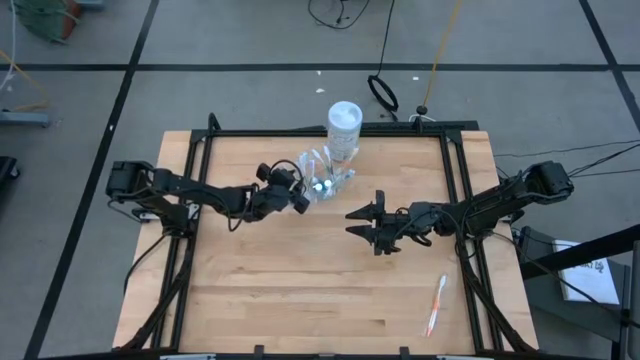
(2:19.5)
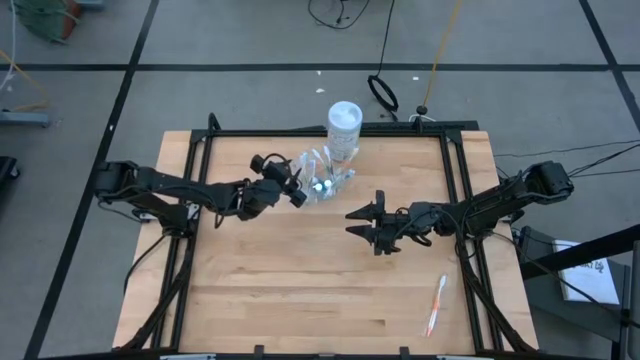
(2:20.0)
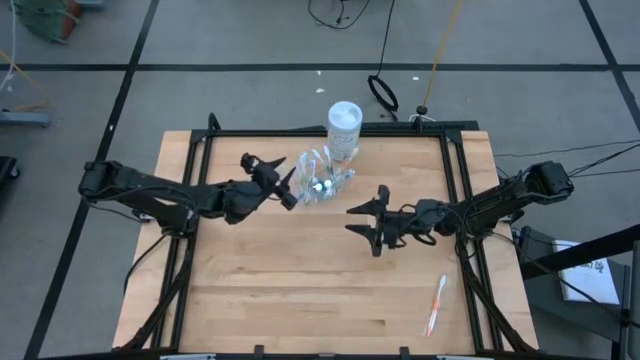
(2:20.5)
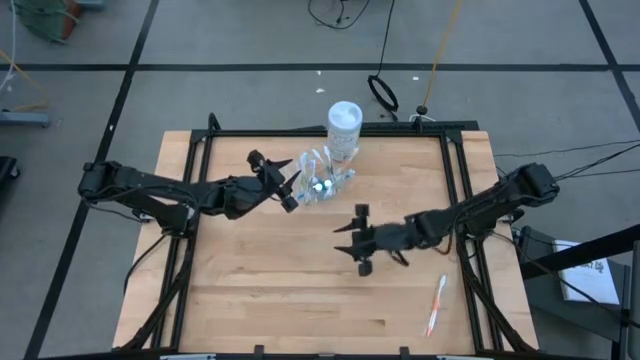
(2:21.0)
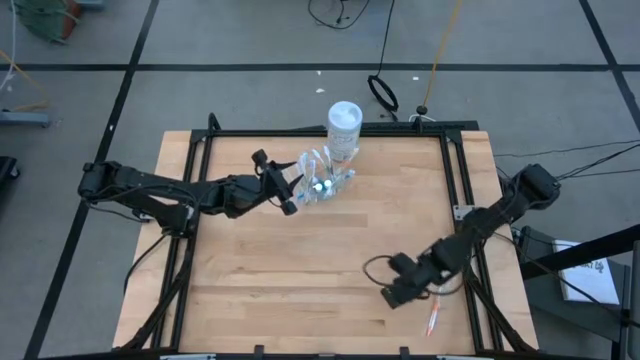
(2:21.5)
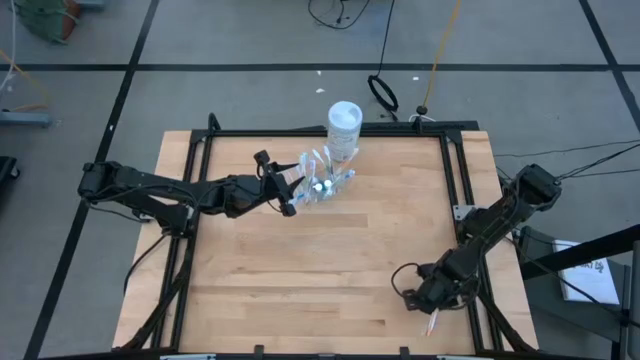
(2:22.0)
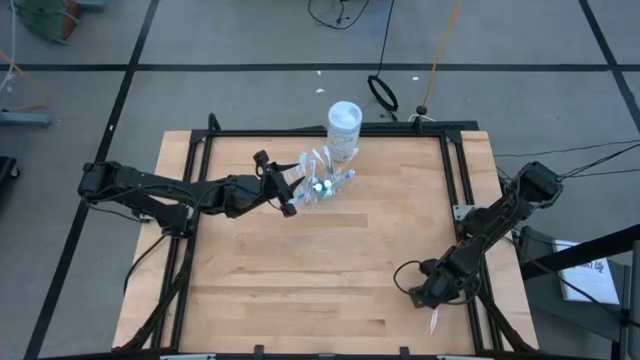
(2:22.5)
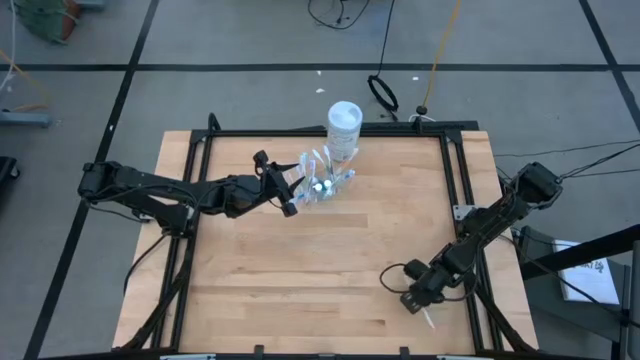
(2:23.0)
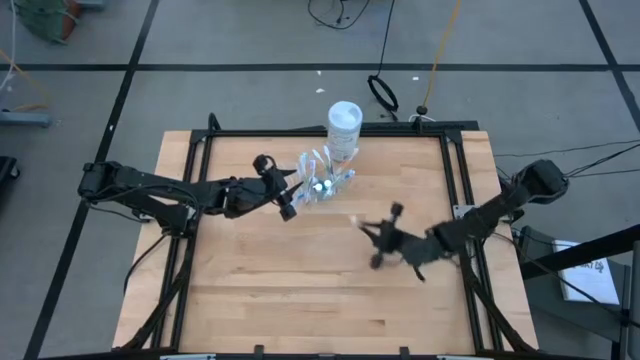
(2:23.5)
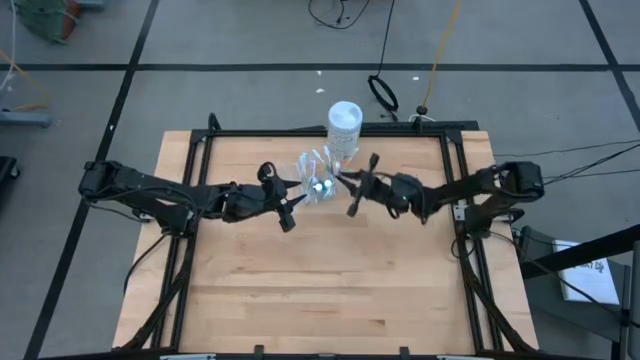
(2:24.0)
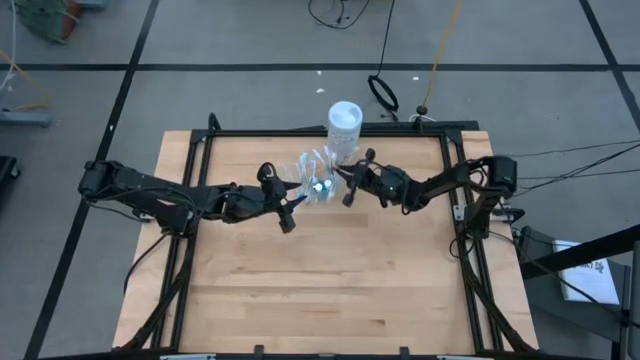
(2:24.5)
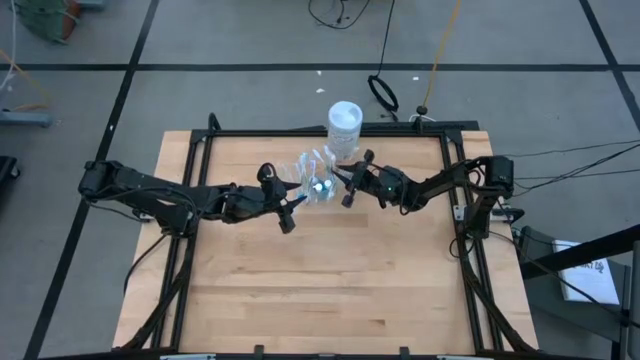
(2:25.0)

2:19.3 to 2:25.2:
Task: Pick & Place toothbrushing station
Put the orange toothbrush into the transparent organizer

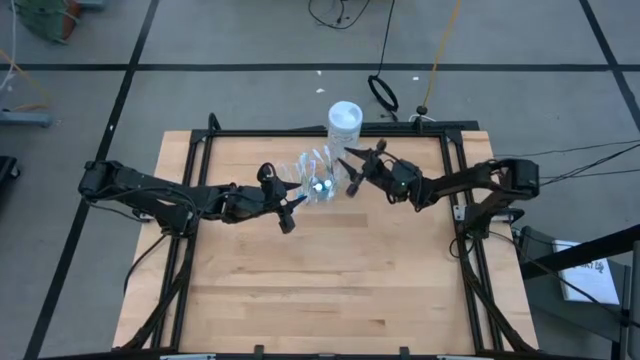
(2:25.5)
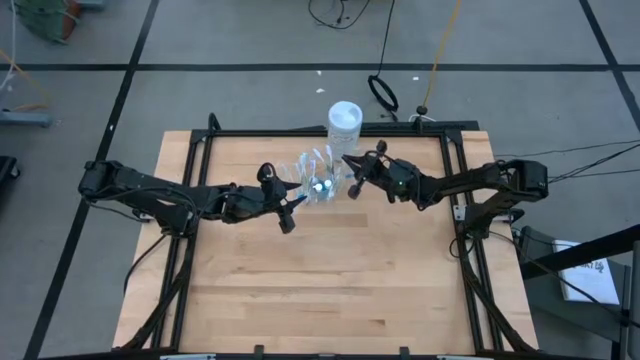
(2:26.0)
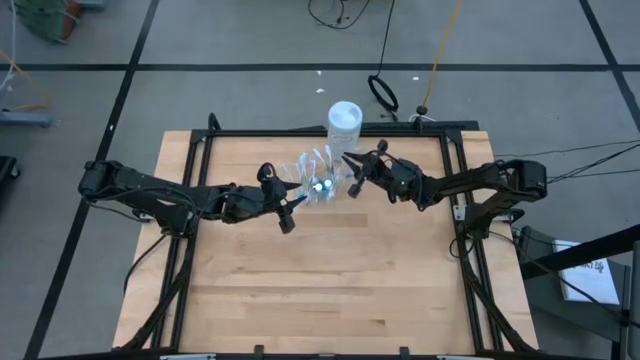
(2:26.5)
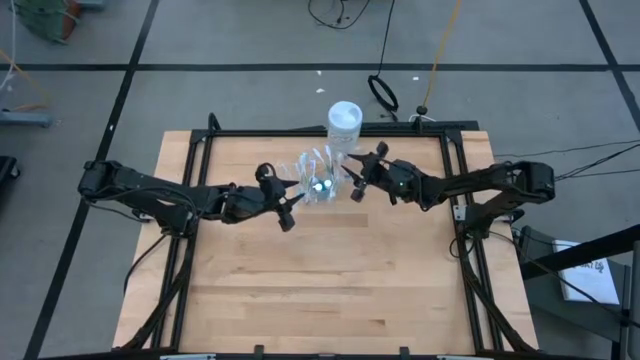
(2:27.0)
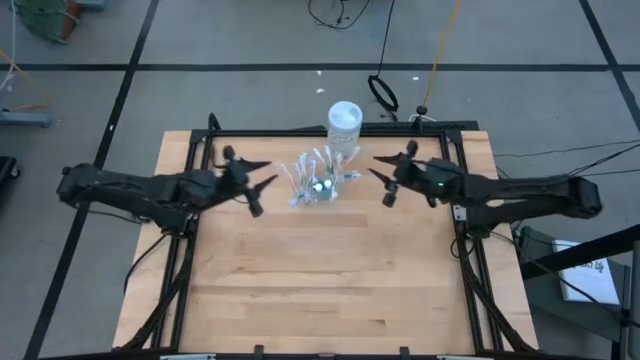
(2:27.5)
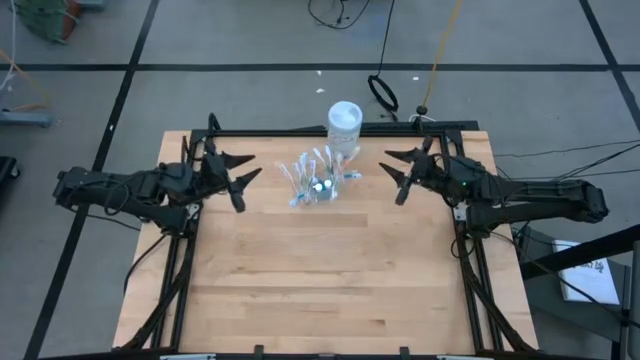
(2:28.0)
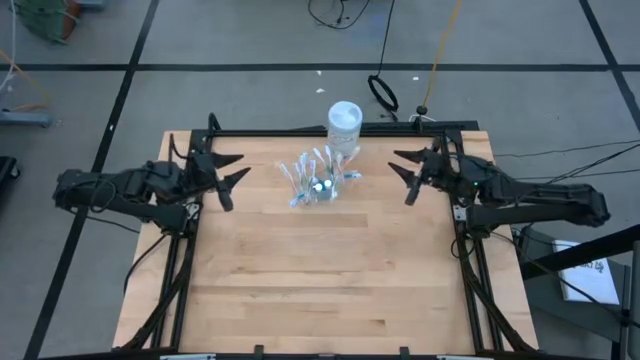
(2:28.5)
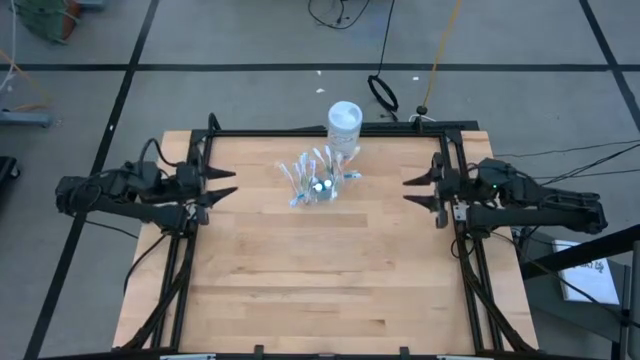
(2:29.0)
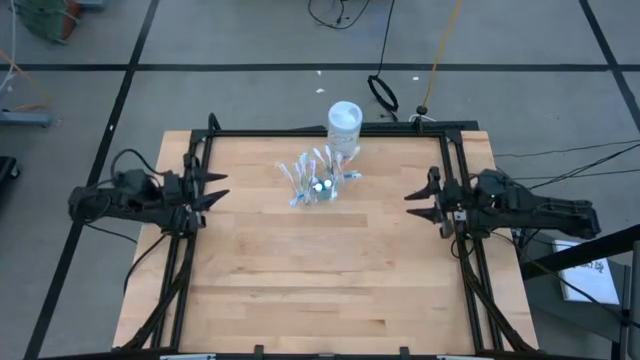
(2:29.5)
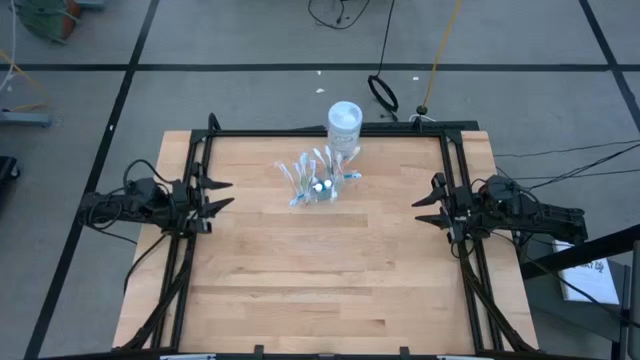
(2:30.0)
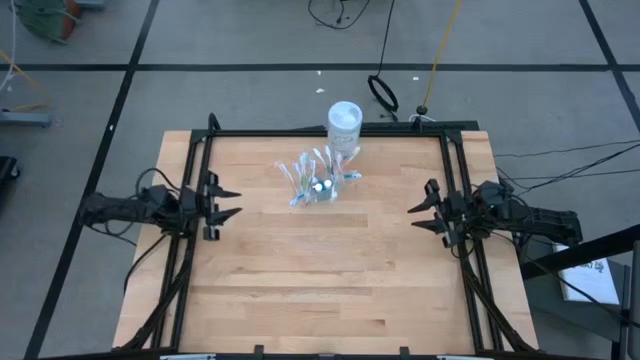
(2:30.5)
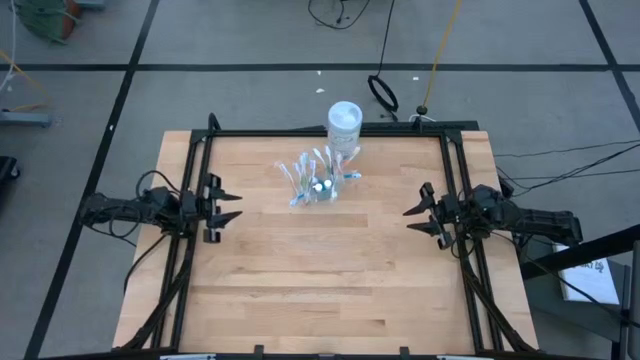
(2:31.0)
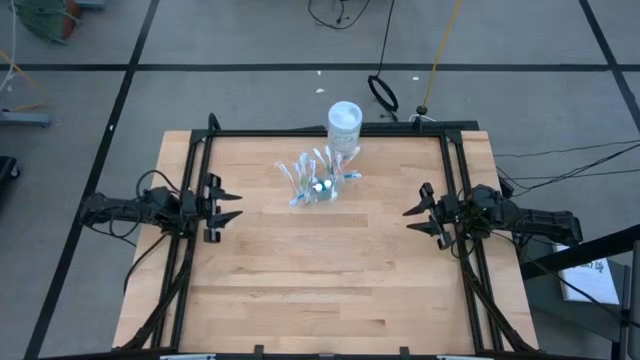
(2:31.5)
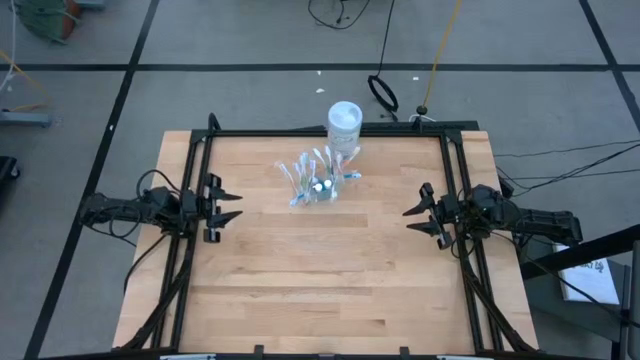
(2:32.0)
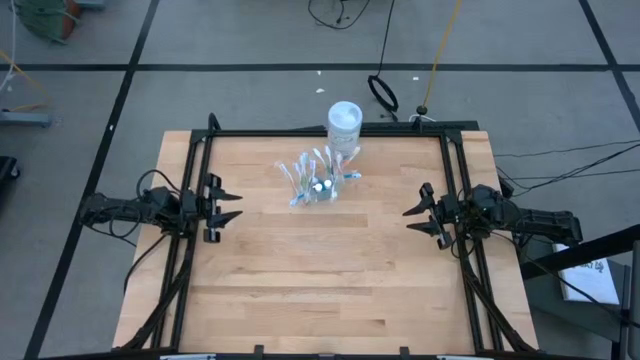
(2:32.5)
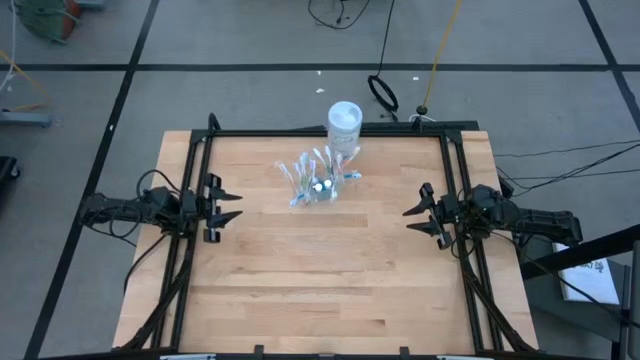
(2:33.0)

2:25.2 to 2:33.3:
Return to Home Position

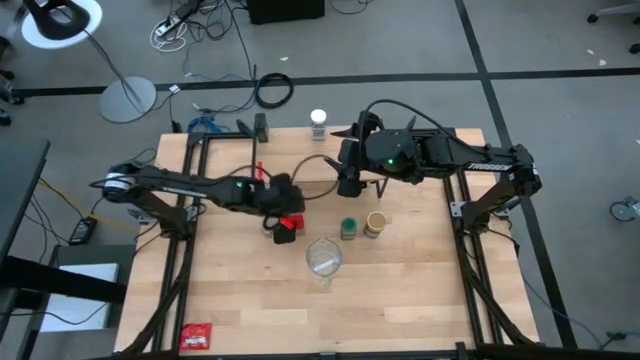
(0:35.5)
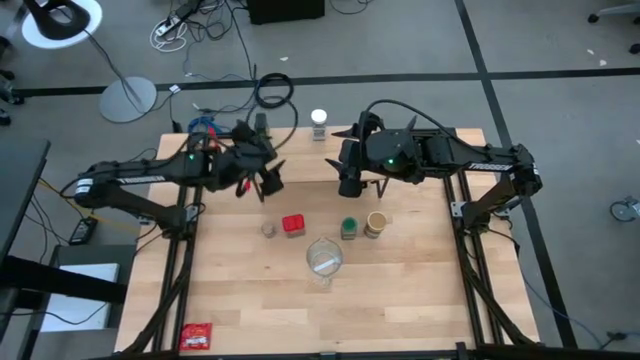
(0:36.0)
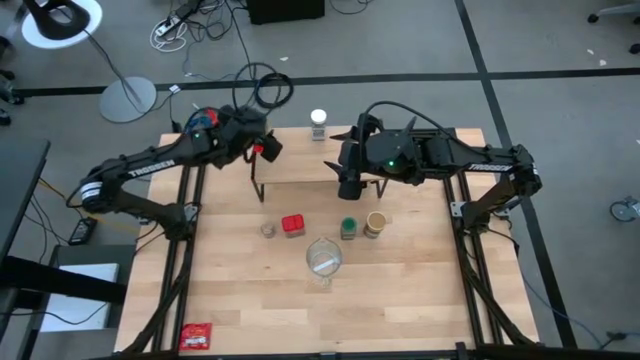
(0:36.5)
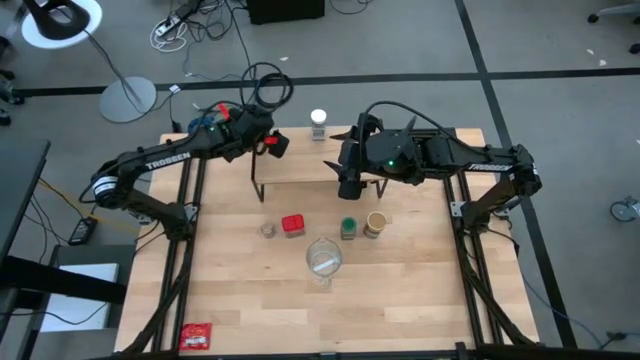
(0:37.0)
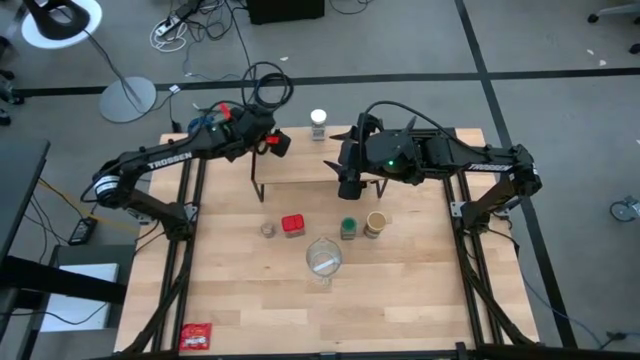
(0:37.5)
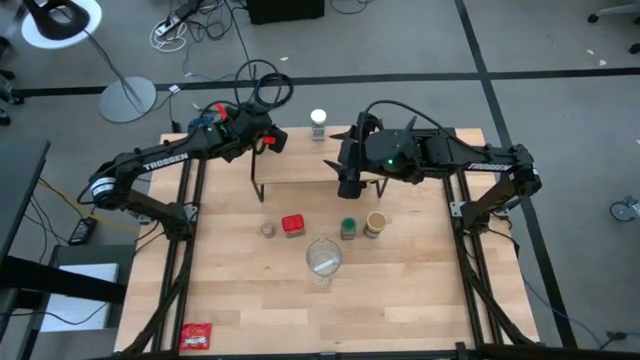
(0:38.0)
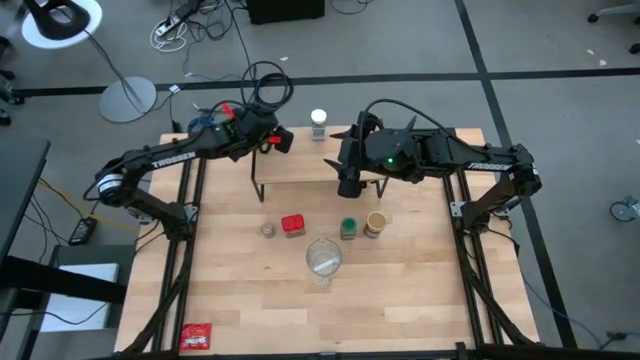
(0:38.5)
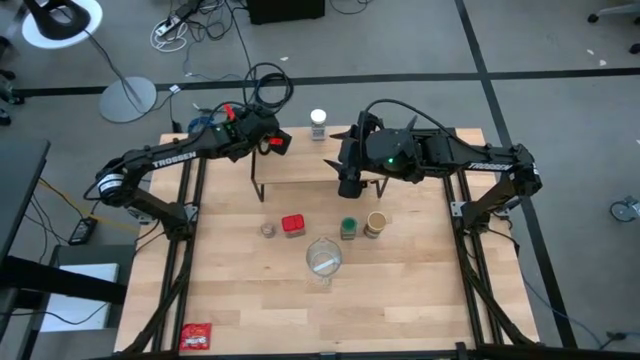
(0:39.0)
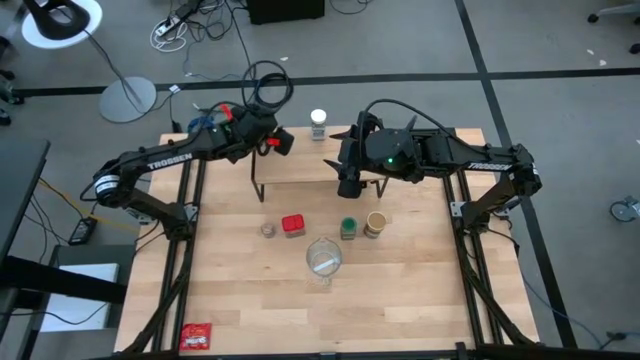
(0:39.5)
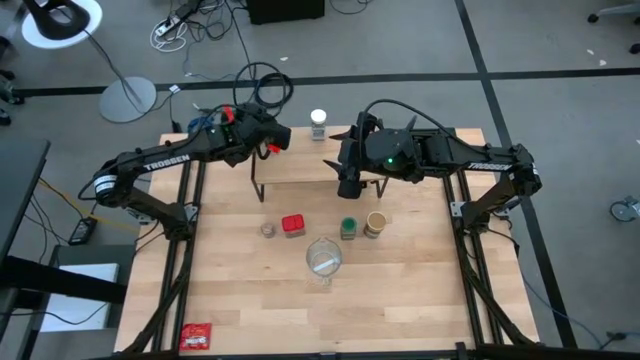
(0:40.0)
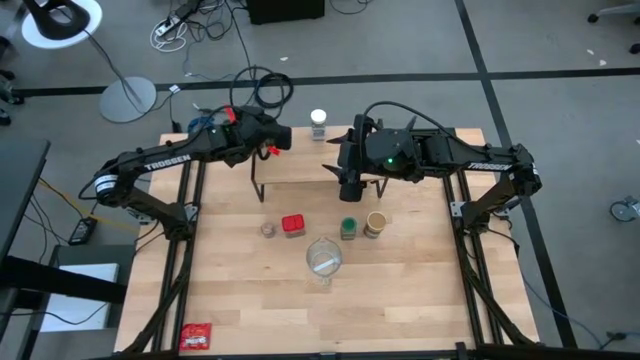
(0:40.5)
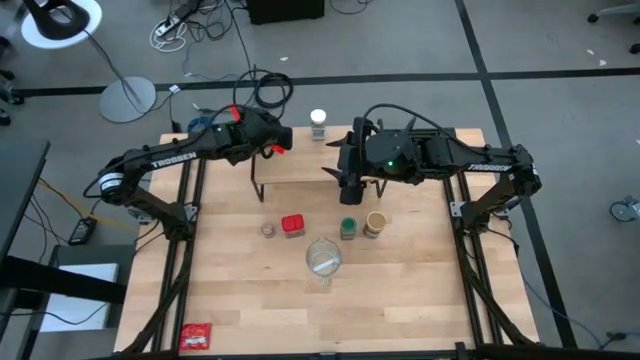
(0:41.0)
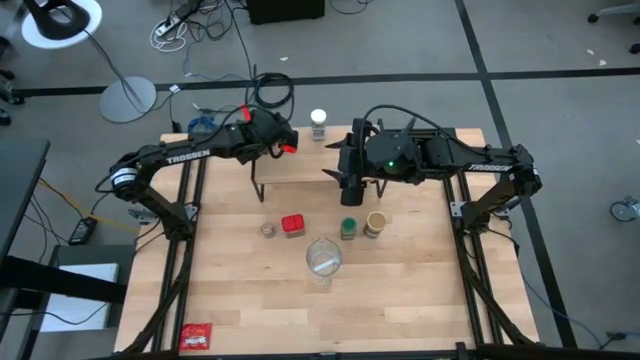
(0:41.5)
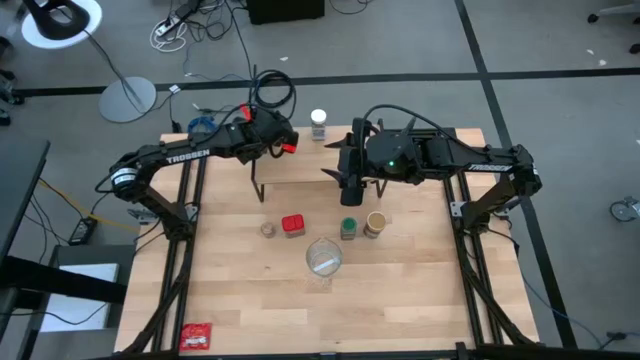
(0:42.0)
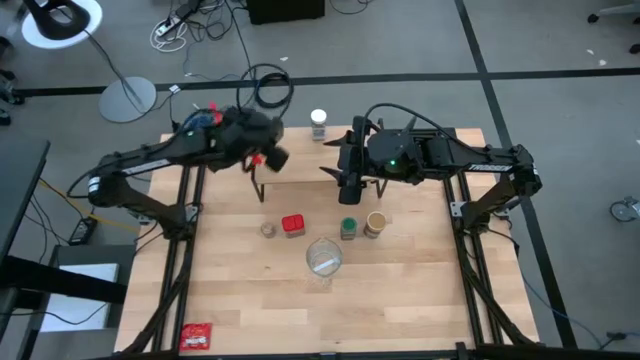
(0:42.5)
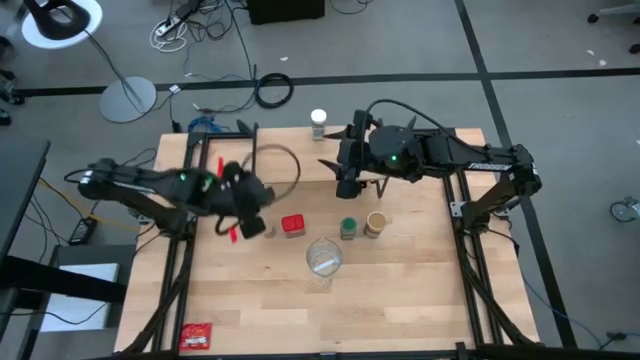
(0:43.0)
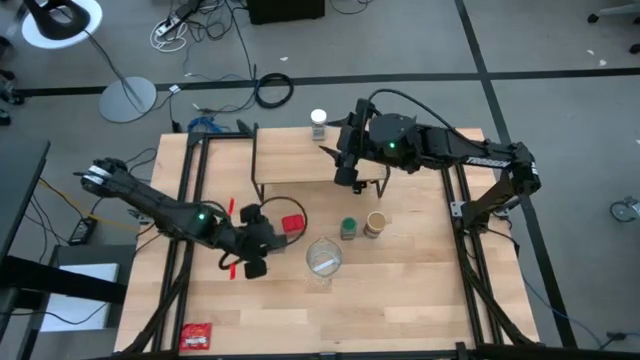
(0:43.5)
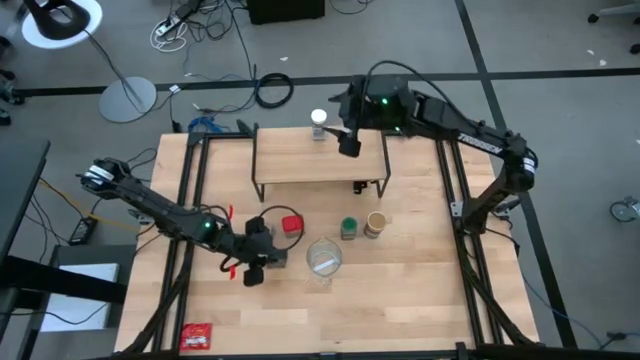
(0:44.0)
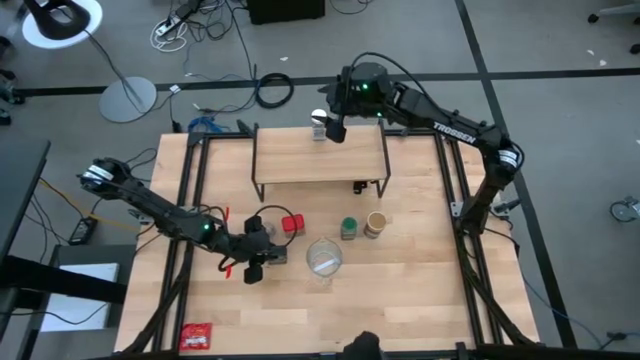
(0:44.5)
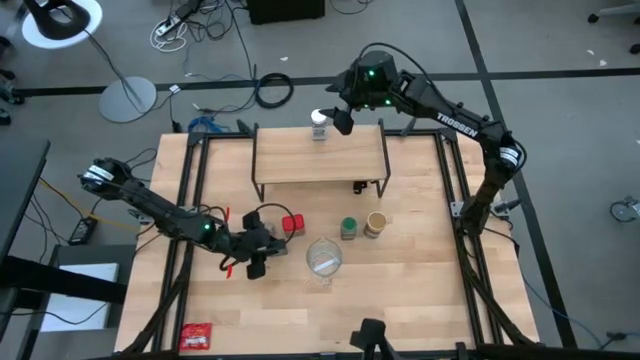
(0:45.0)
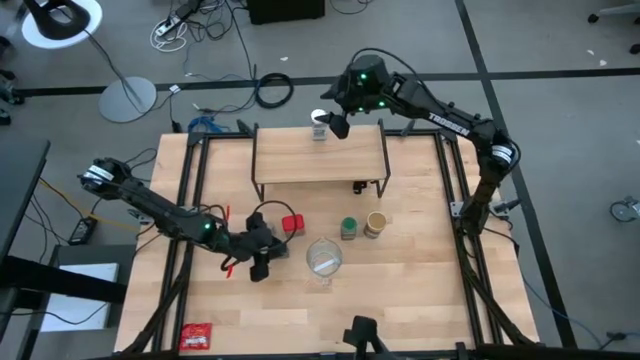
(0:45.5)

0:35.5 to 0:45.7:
Task: Shelf spices
Remove the black seasoning can from the shelf
